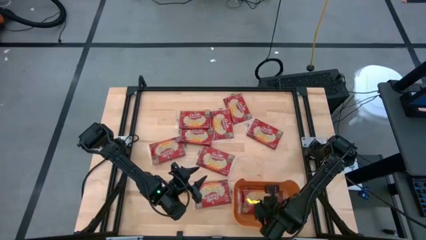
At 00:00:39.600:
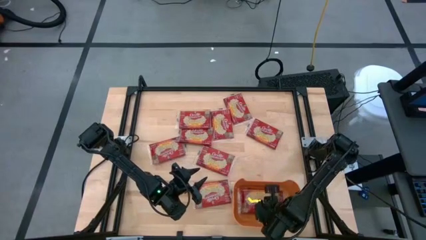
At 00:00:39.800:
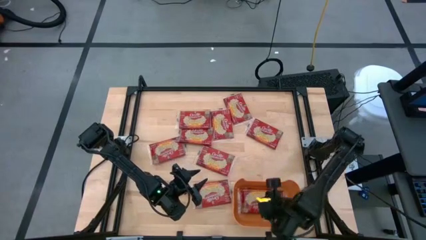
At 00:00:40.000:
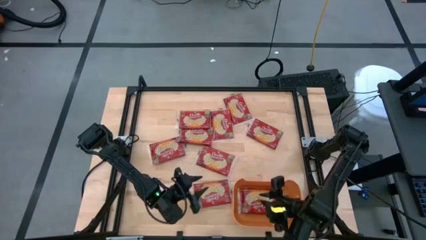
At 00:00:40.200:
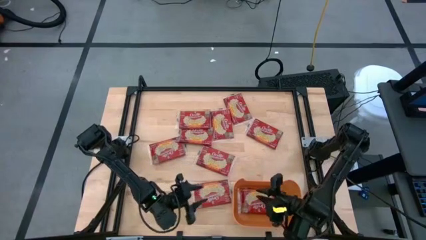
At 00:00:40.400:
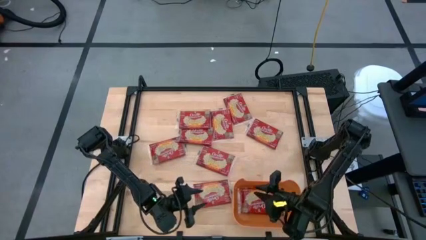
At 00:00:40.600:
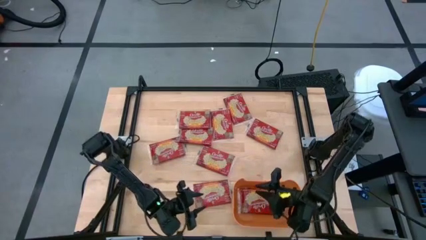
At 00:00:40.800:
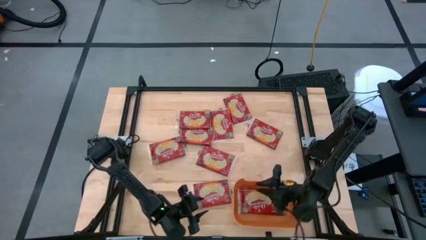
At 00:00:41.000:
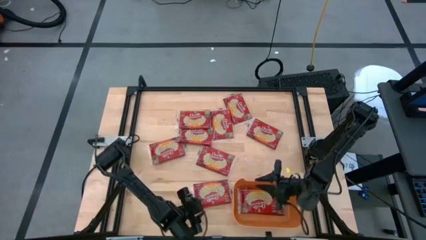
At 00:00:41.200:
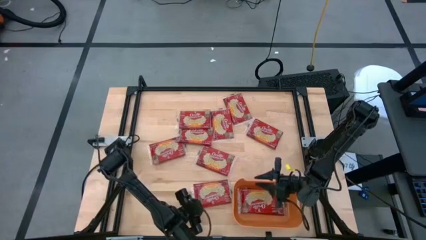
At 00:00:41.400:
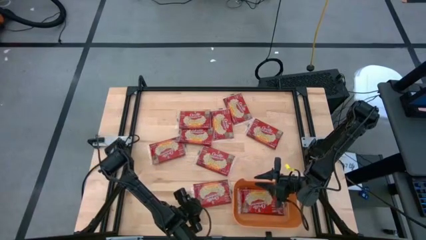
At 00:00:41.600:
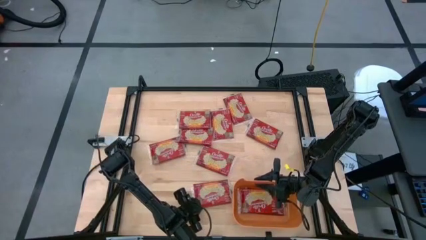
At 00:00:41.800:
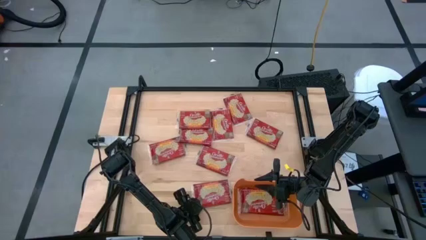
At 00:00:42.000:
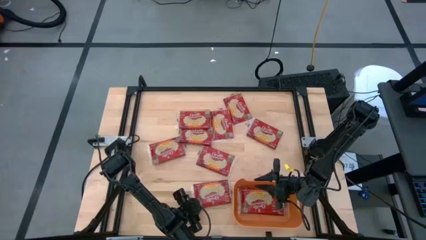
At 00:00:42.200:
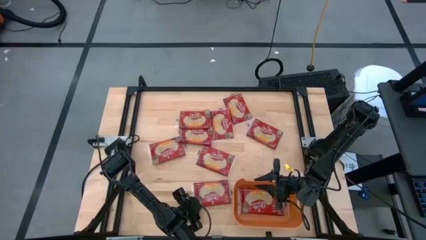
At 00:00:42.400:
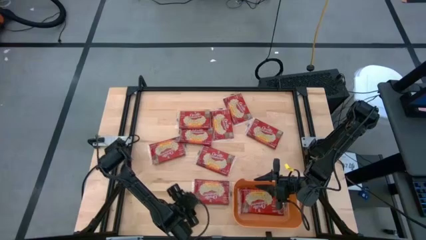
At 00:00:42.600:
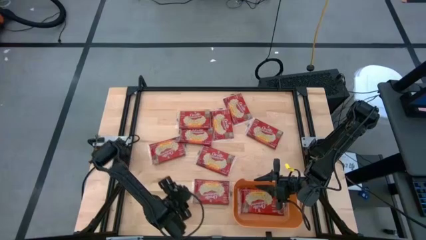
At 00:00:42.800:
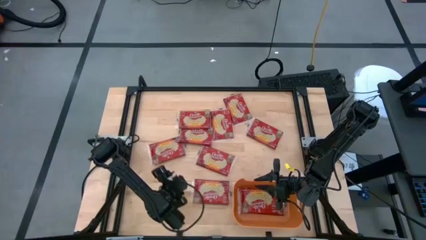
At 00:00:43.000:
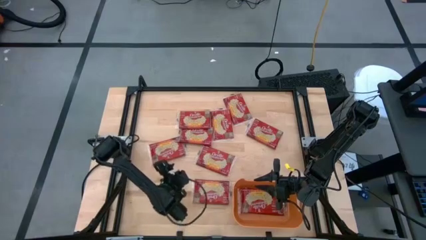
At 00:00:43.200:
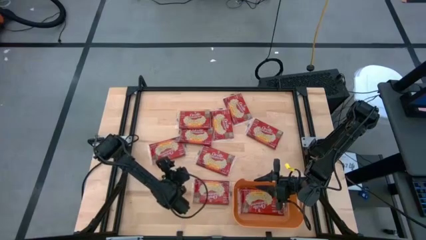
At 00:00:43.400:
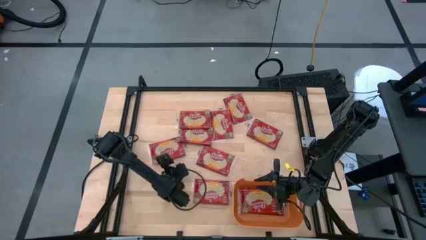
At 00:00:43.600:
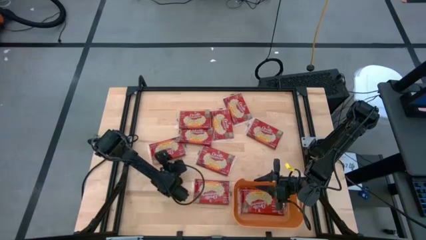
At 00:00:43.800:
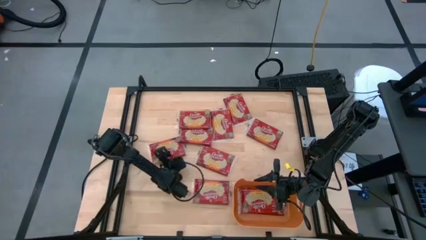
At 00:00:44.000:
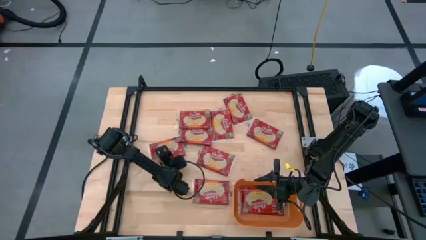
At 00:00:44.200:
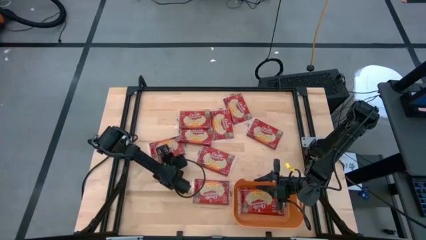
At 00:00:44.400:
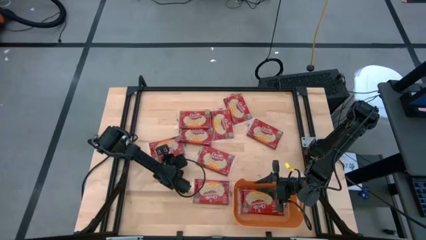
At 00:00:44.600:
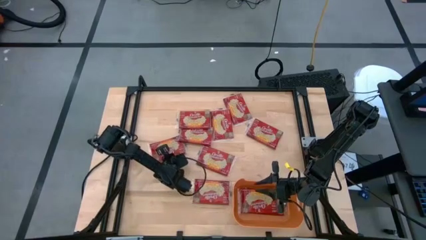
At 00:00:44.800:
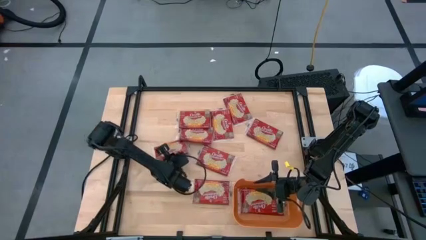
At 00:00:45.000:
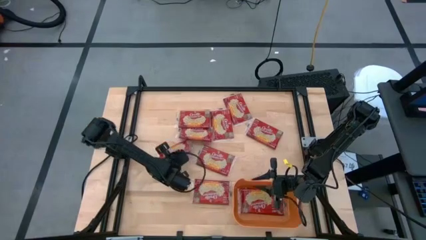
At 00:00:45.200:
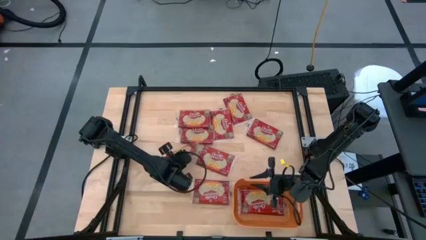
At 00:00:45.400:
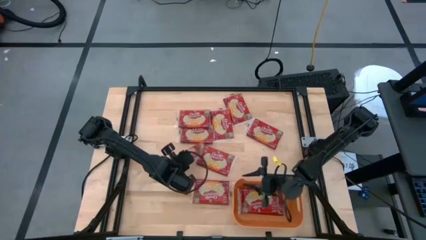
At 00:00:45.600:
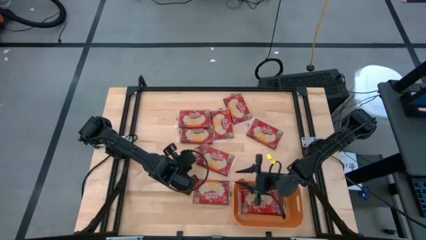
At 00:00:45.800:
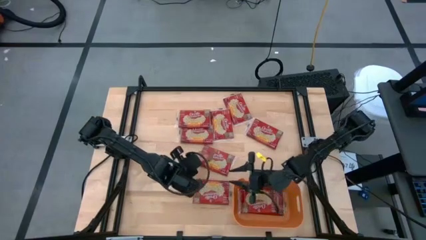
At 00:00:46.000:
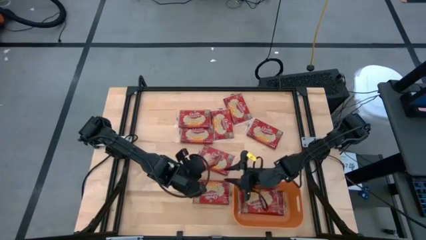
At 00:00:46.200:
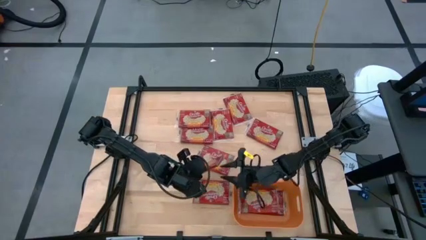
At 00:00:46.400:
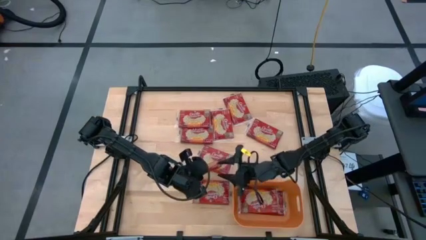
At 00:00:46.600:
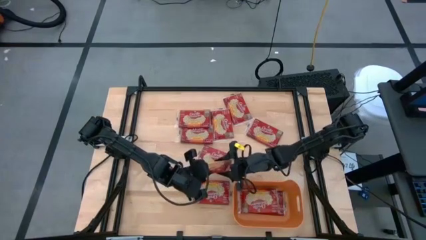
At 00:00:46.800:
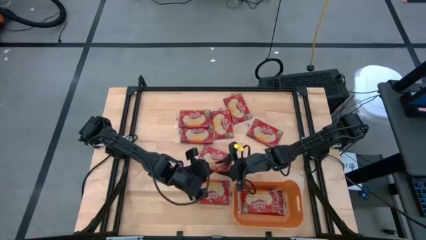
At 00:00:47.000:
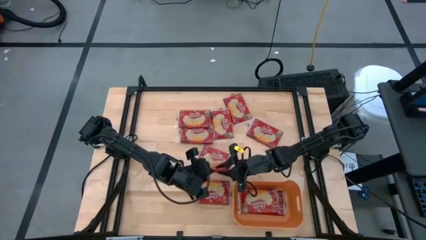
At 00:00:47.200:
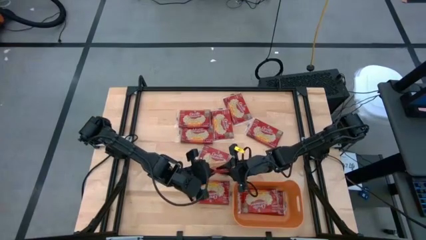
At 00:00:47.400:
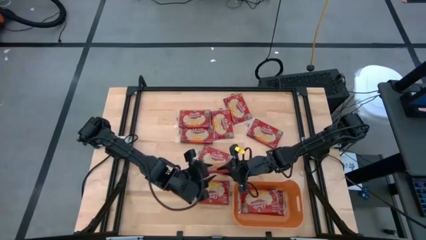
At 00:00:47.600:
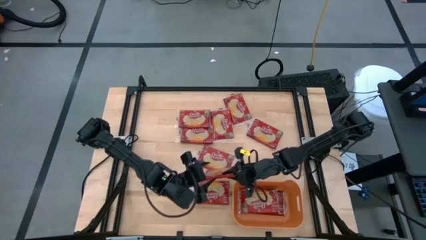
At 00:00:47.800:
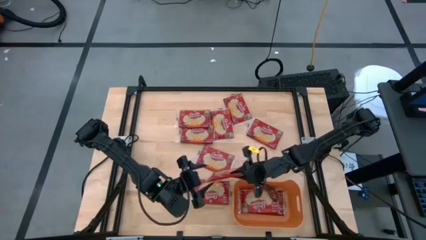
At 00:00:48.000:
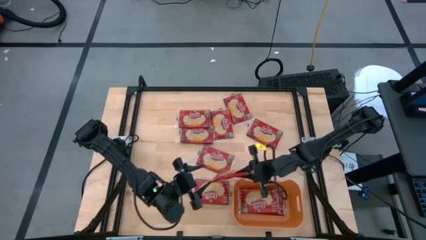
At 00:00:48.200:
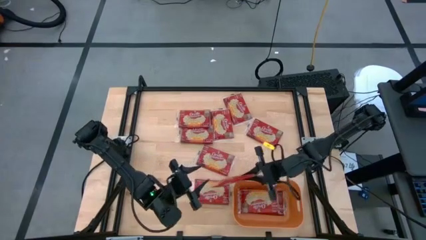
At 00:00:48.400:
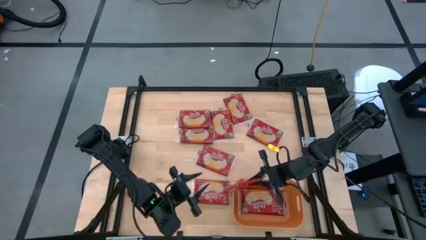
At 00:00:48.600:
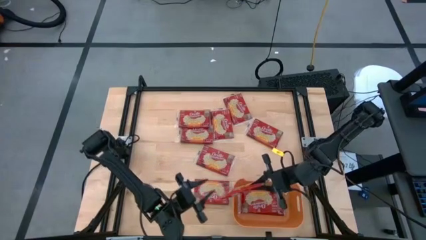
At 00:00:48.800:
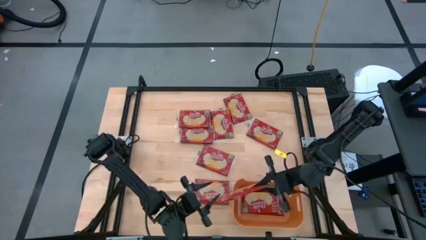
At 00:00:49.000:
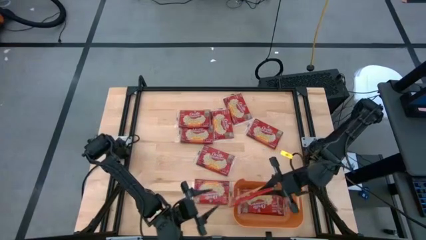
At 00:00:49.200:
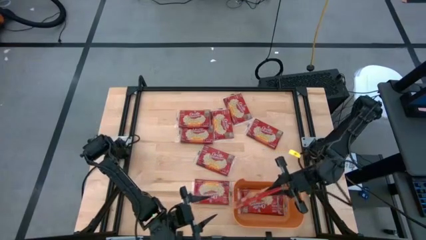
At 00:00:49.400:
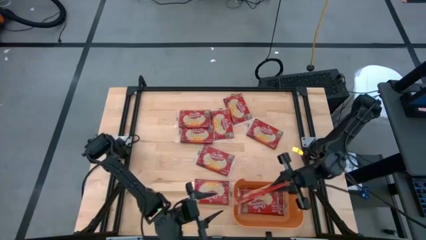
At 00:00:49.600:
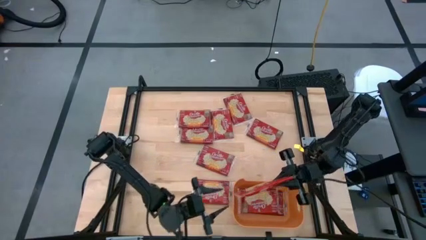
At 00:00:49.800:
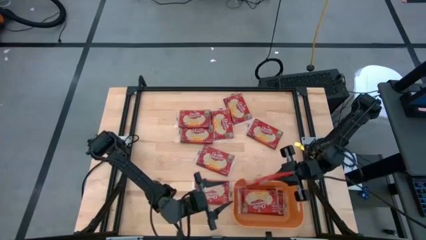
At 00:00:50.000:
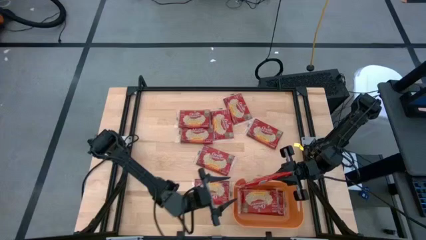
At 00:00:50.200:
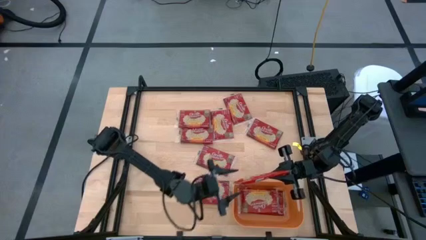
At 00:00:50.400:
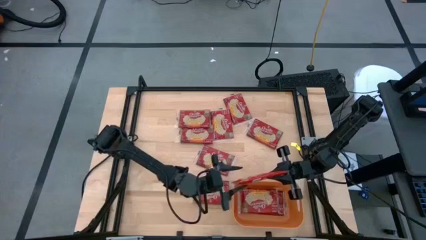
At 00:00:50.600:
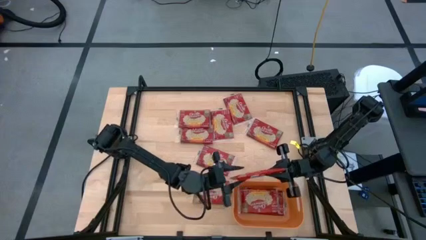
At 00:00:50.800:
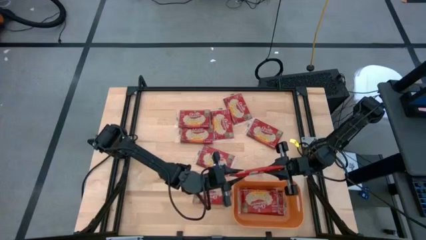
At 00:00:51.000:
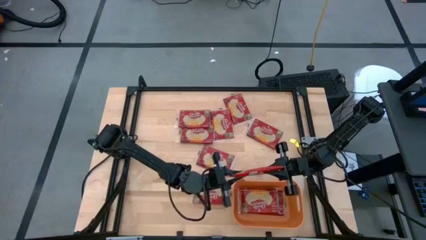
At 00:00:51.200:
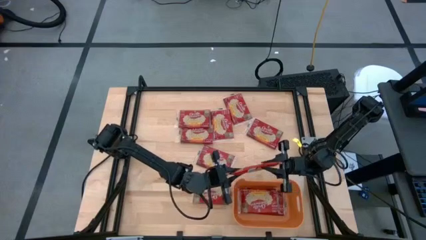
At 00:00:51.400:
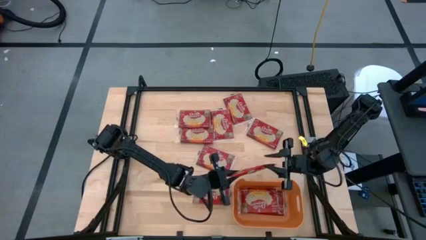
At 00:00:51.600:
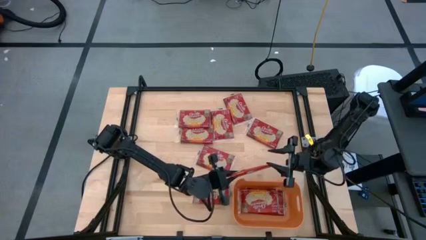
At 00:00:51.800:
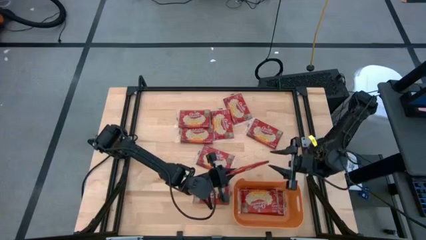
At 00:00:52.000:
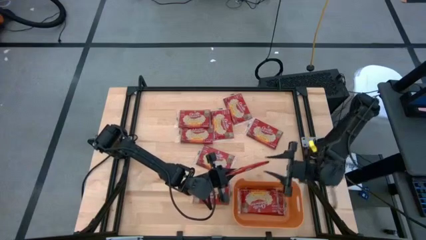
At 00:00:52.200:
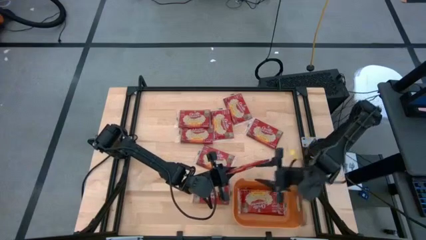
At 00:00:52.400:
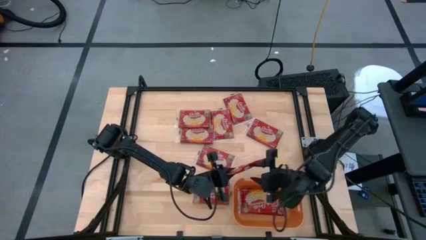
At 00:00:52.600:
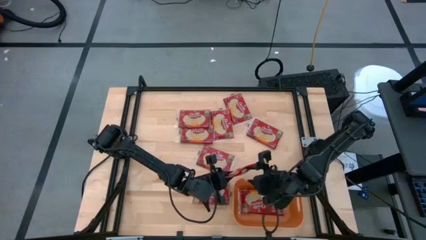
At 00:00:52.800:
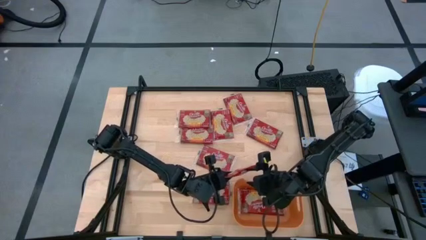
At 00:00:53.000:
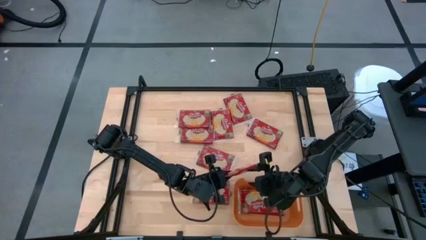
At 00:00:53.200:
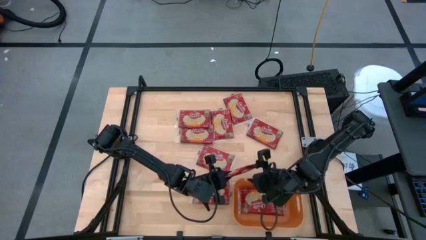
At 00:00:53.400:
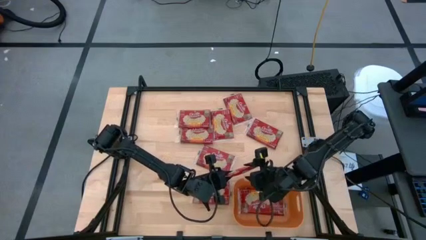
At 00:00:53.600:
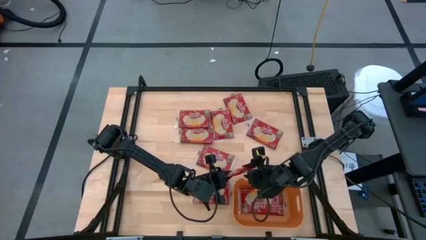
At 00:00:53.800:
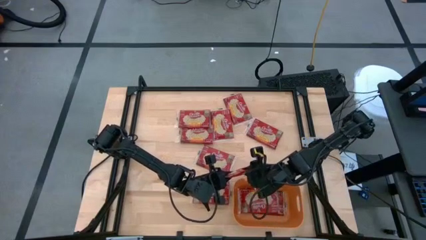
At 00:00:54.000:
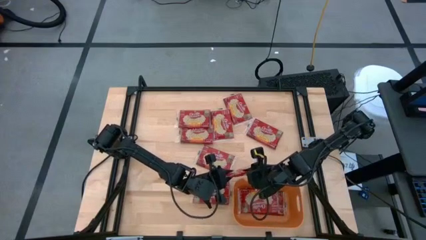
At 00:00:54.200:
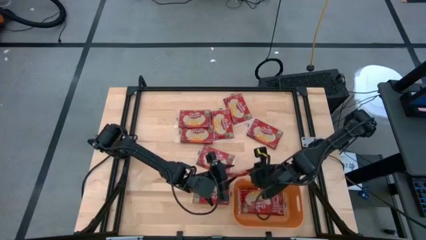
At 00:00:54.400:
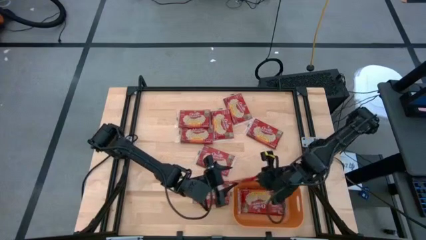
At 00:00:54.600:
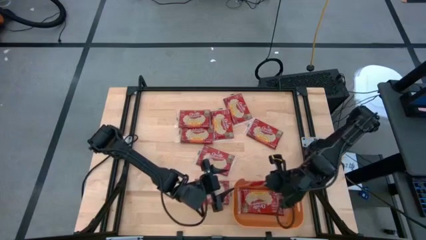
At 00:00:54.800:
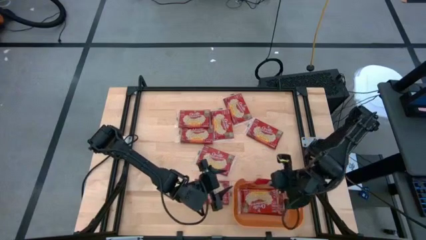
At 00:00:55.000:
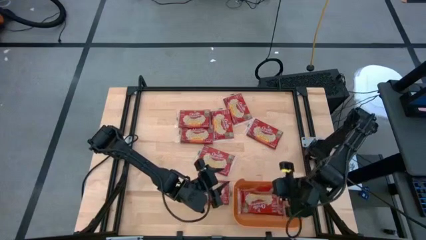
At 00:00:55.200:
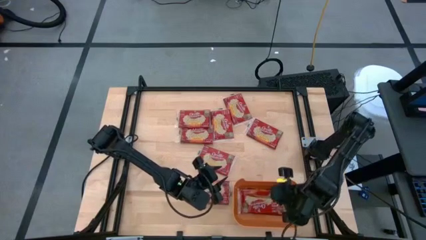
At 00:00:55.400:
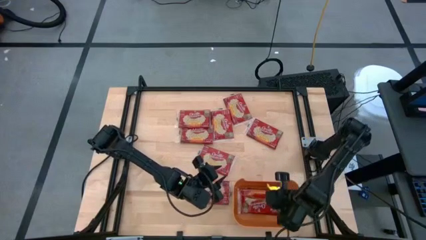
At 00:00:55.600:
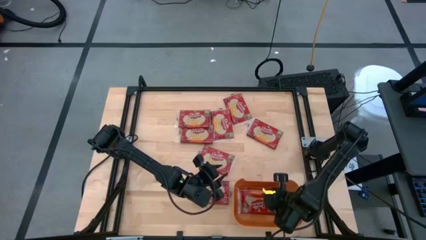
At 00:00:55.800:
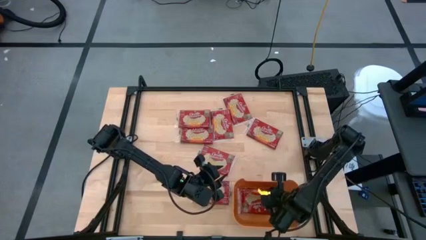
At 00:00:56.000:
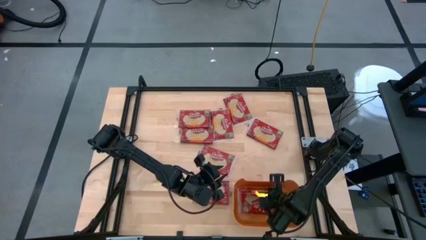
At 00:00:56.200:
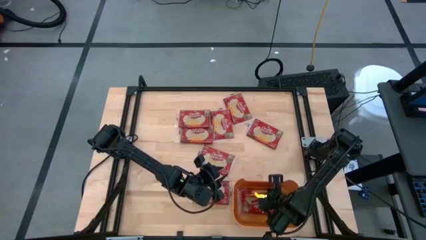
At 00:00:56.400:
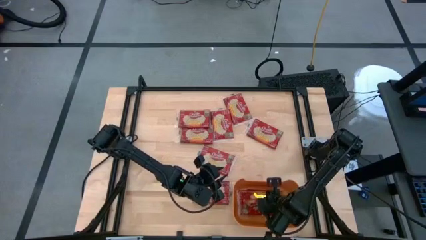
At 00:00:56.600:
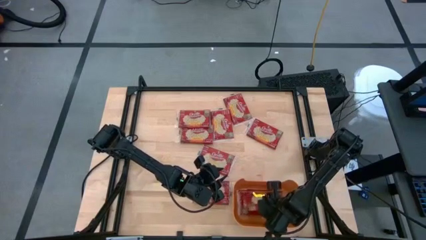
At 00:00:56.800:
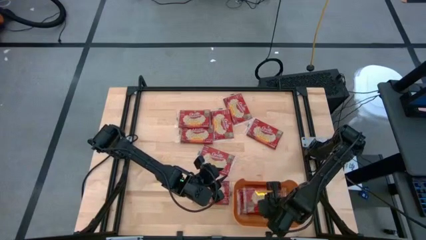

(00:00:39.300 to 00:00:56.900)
Task: Sort popcorn bags into baskets
Put the red popcorn bag into the orange bin
